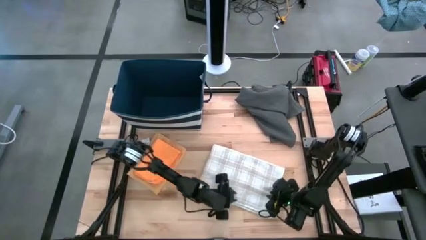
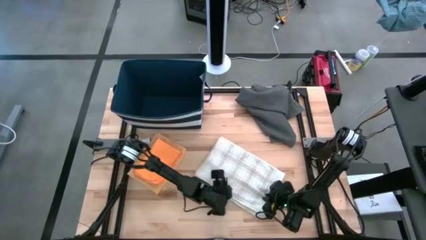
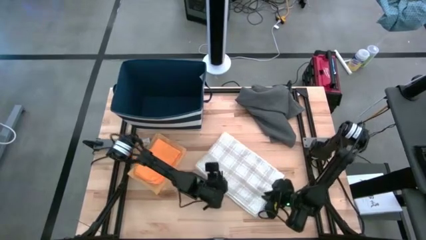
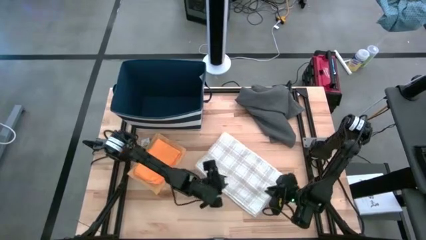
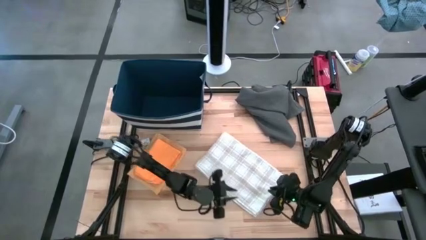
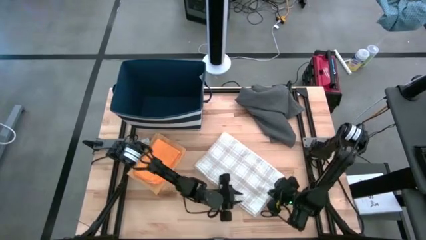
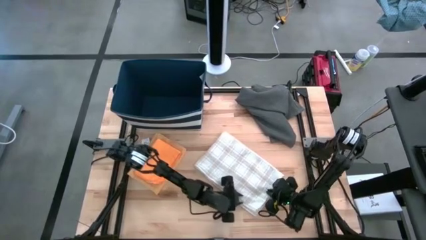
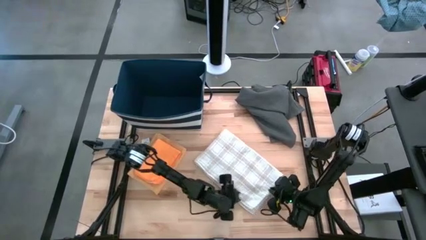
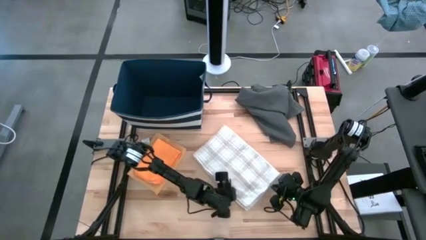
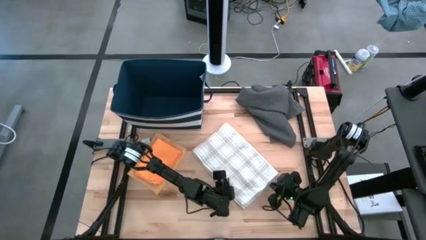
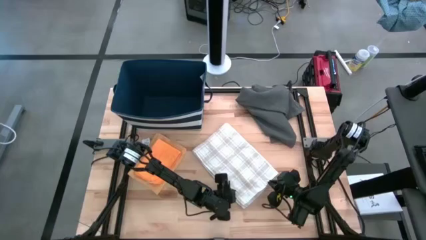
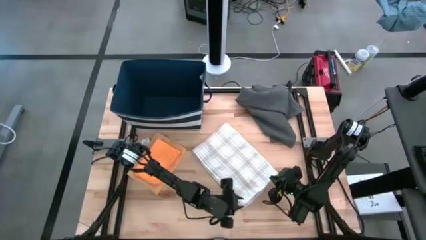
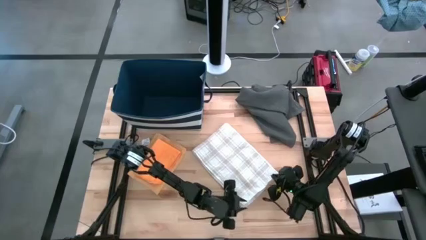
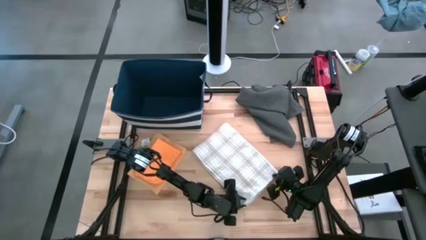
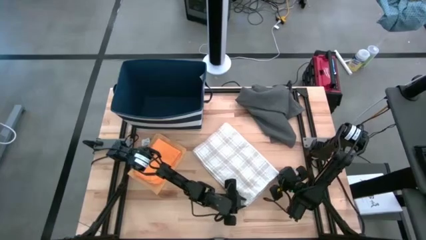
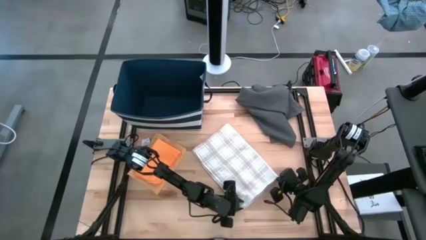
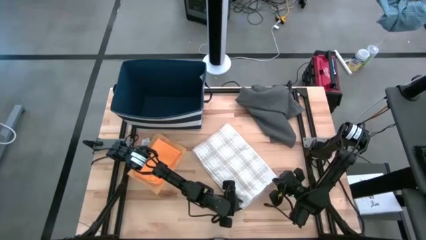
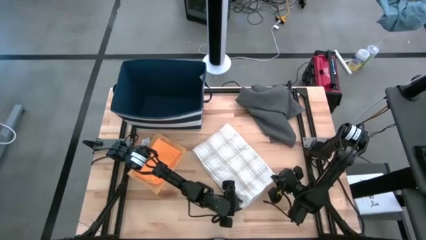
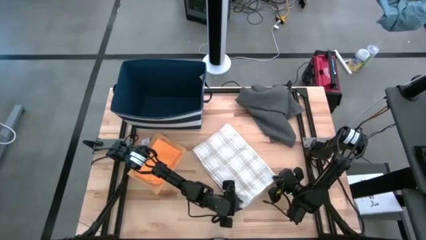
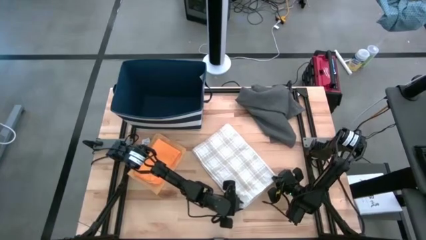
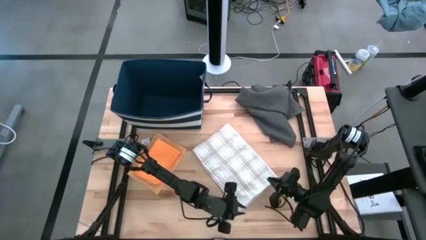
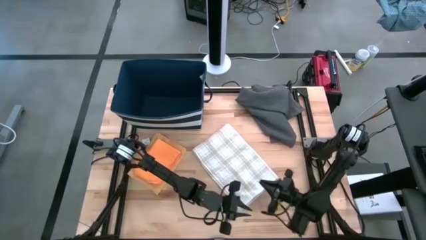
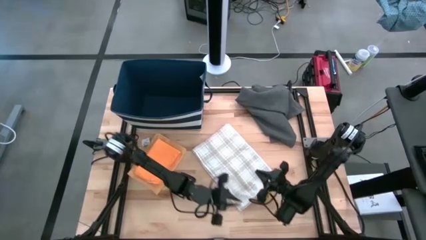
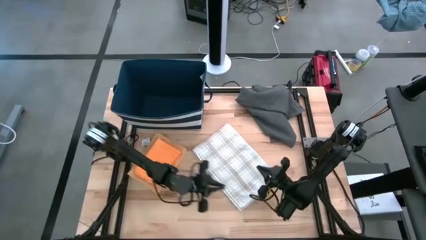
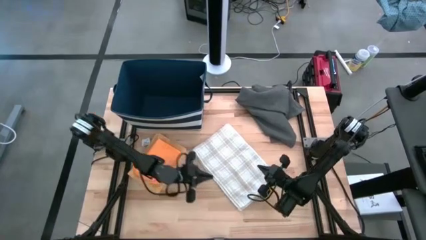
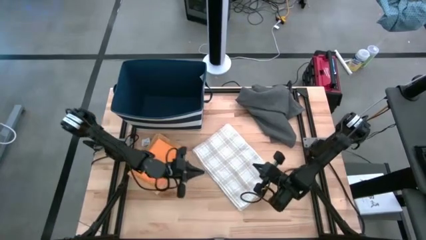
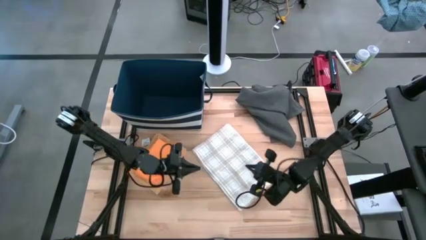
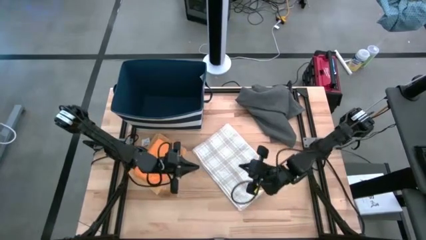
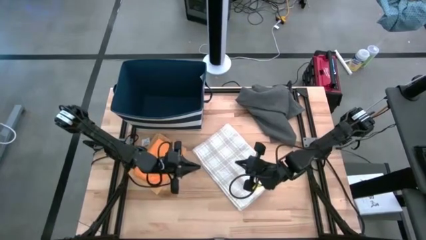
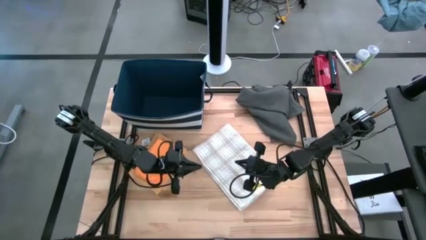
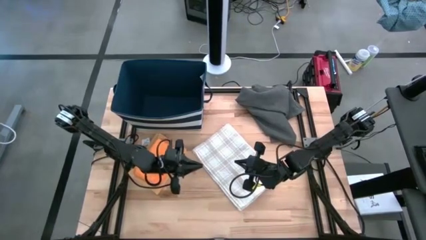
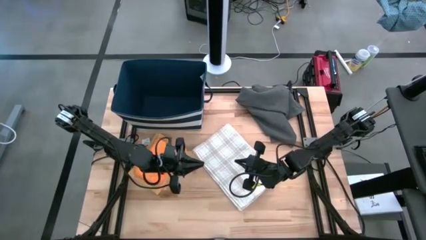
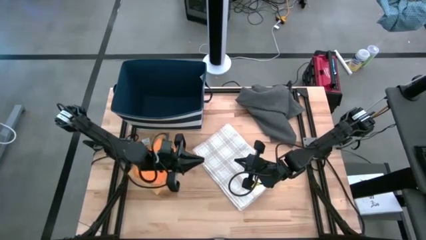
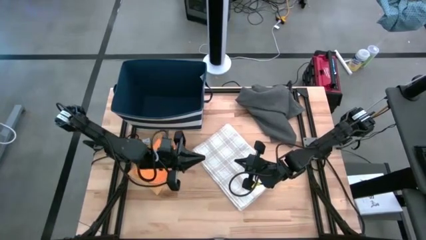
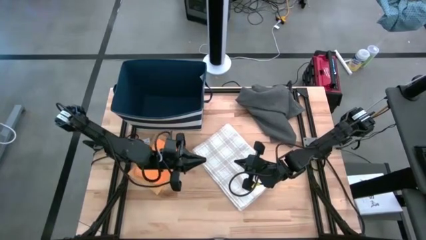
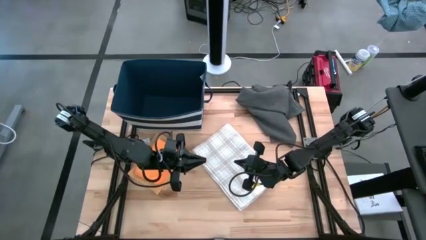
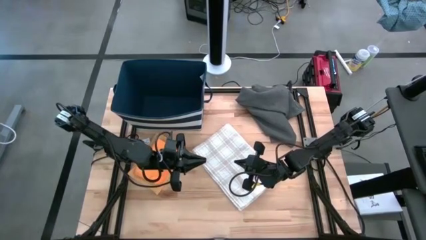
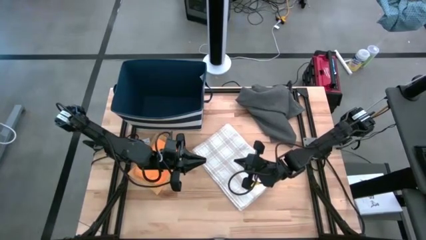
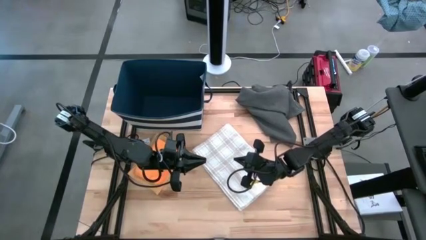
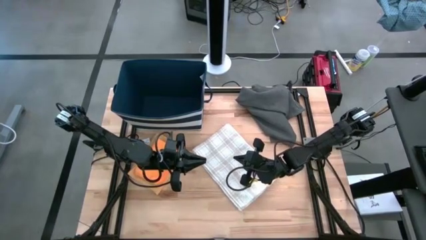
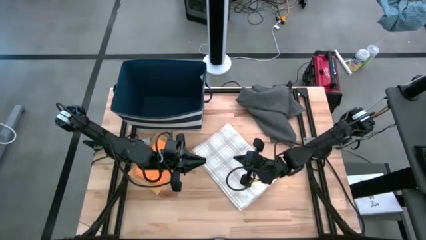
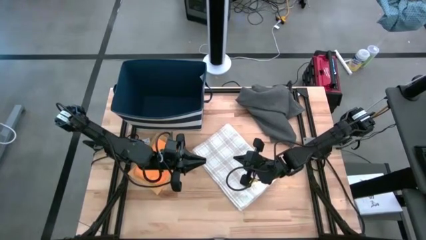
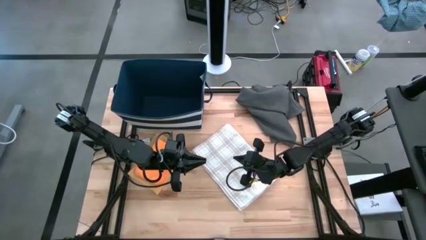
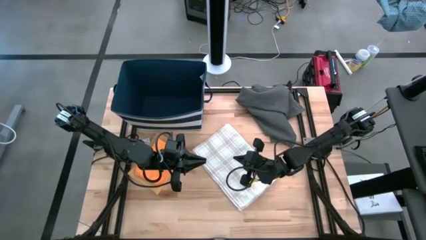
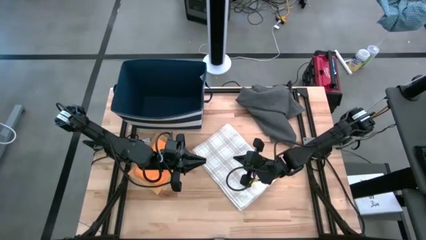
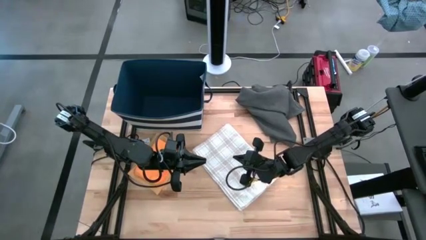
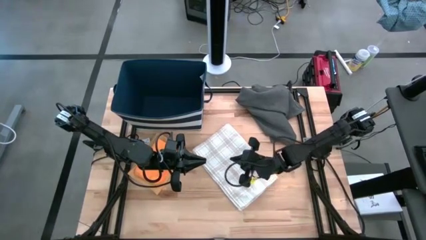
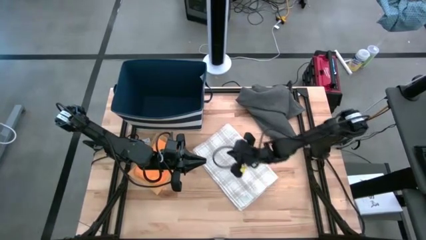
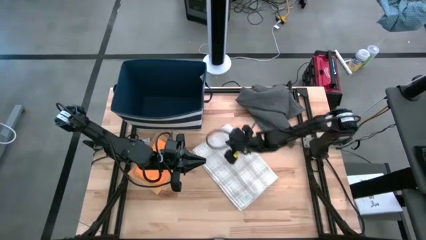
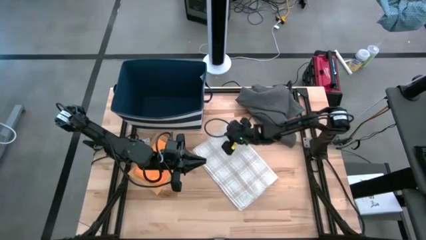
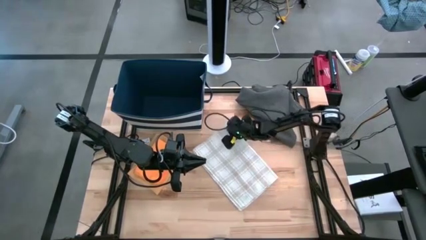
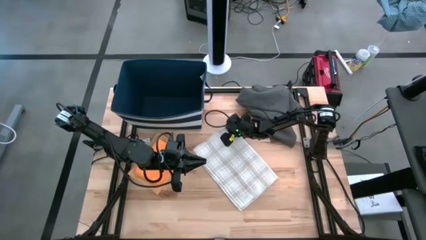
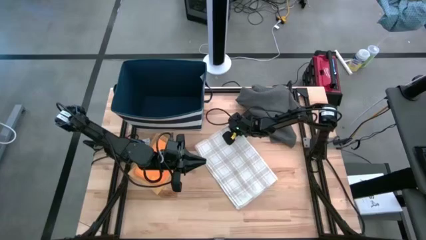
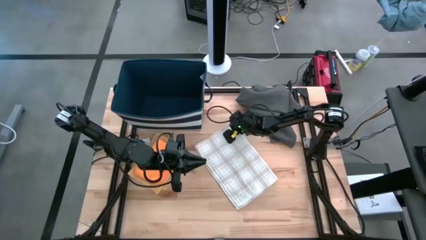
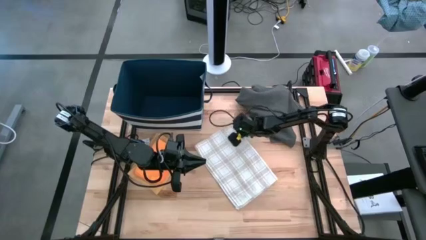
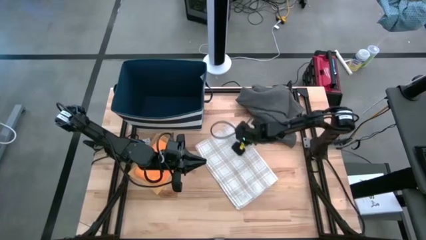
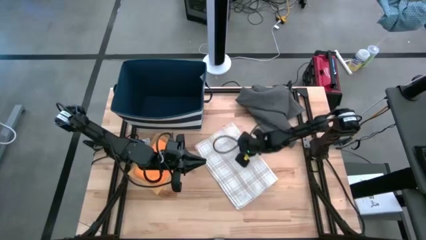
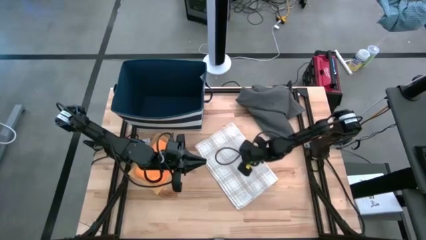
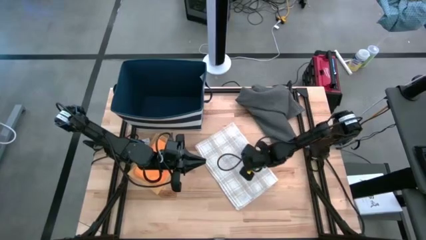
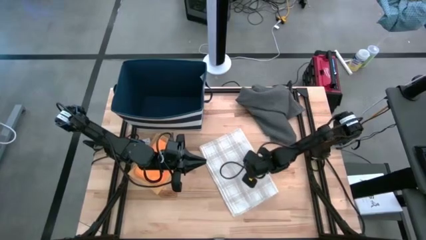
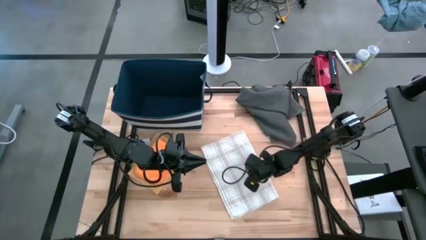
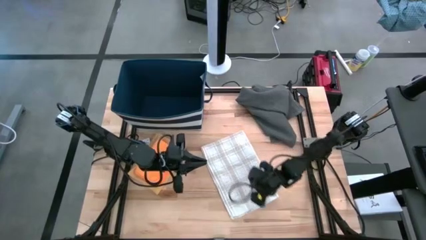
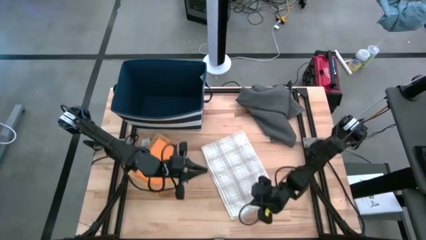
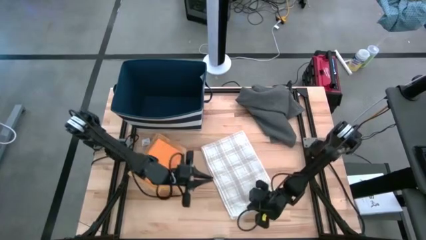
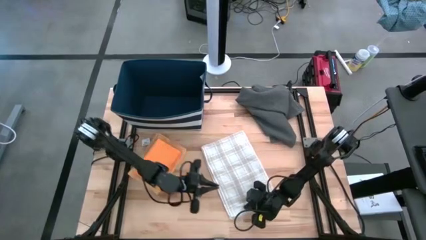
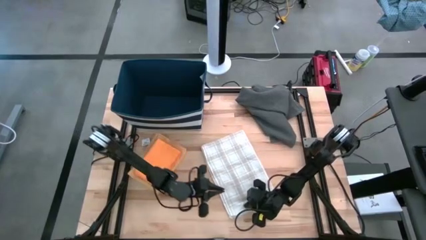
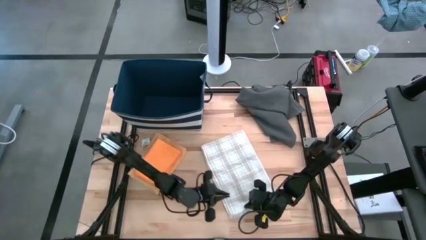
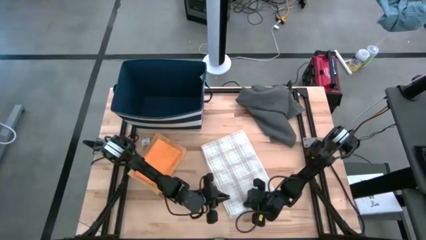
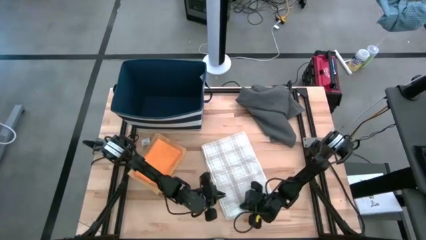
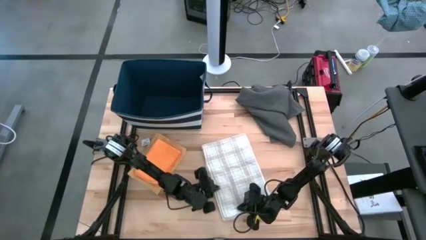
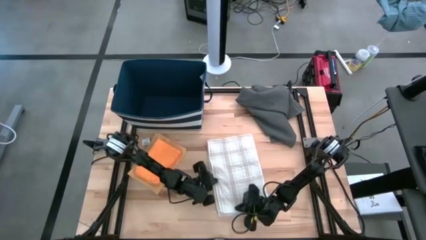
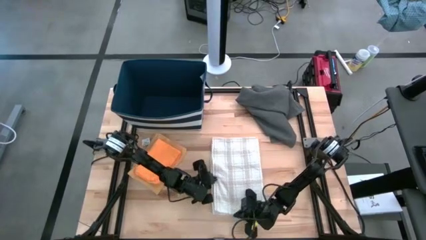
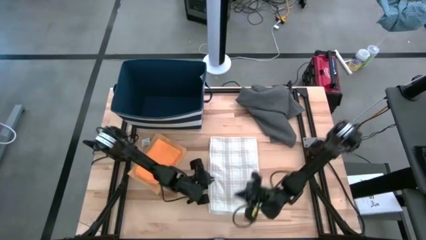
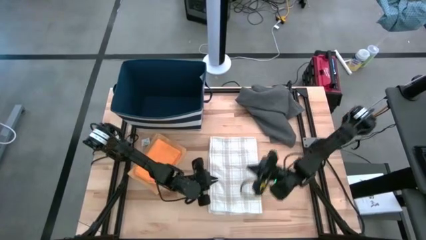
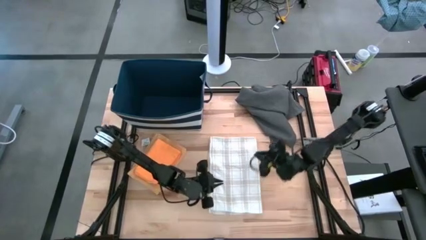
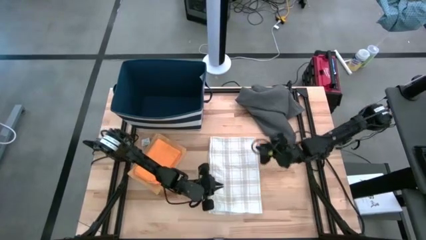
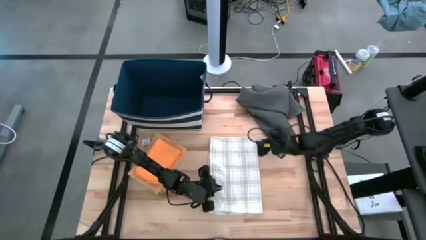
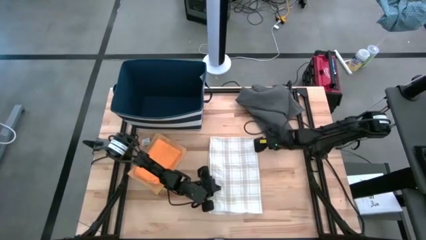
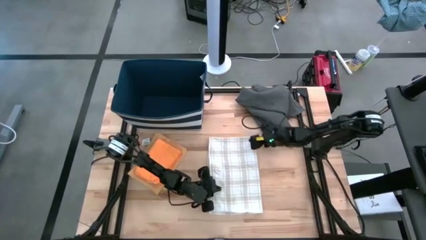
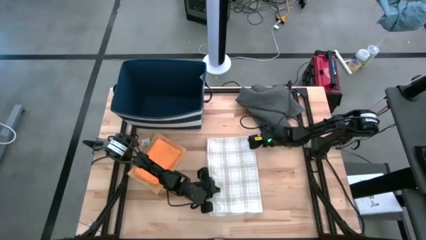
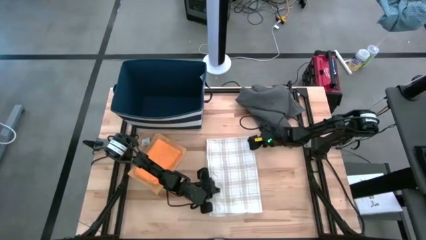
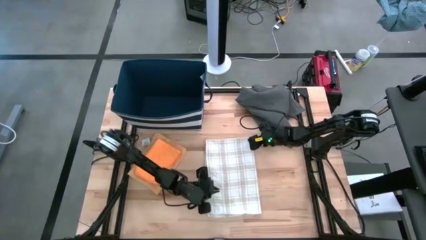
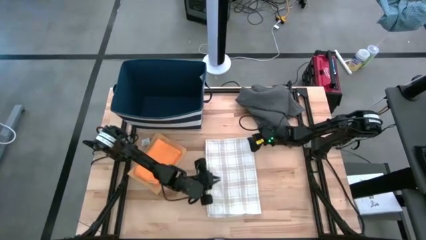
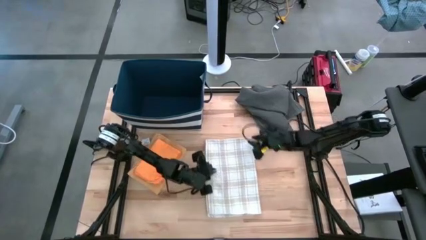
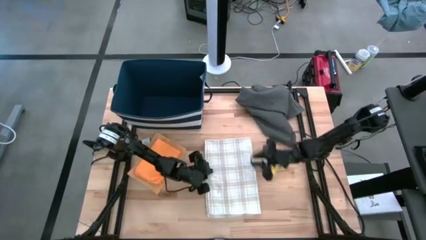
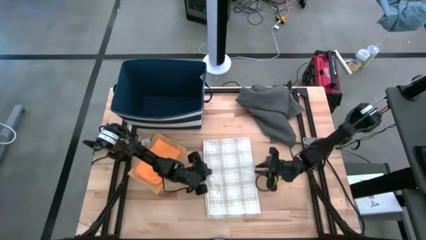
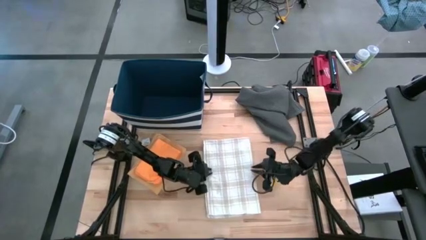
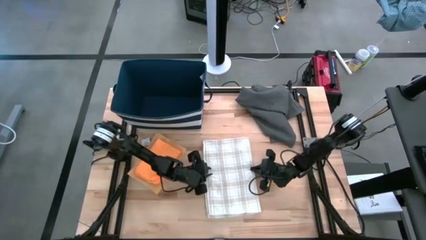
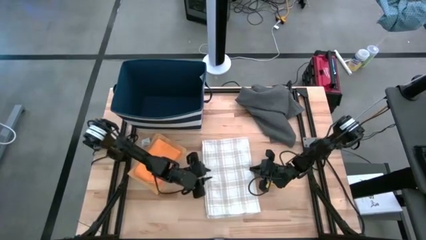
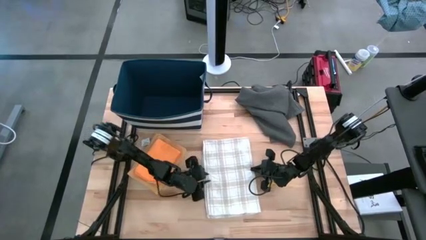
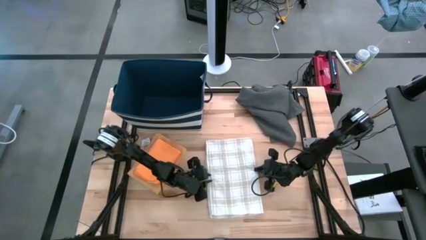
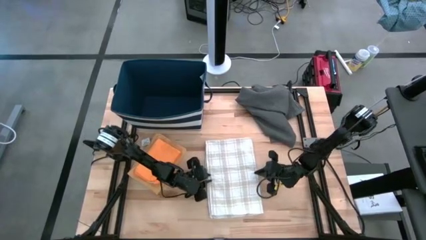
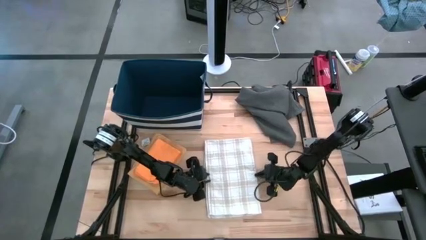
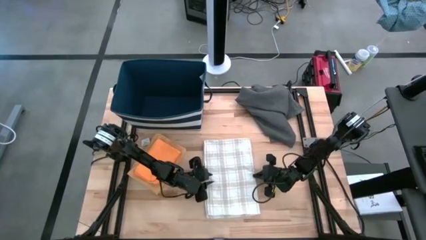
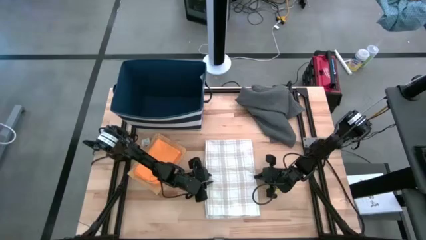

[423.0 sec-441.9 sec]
Task: Fold towel
Fold the white patterned kitchen towel
